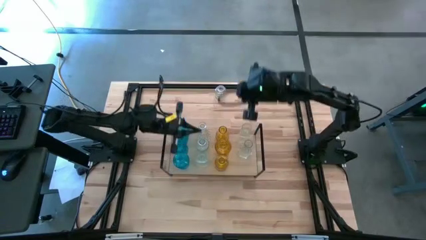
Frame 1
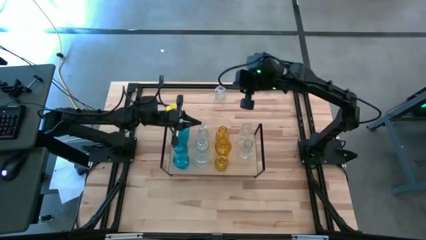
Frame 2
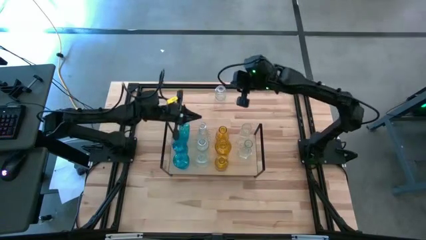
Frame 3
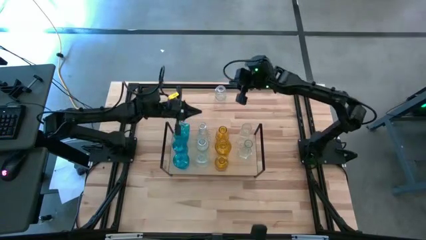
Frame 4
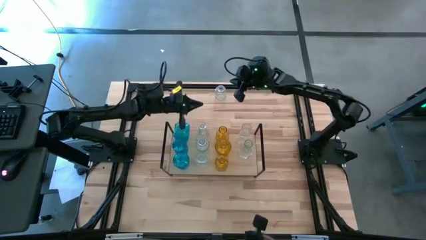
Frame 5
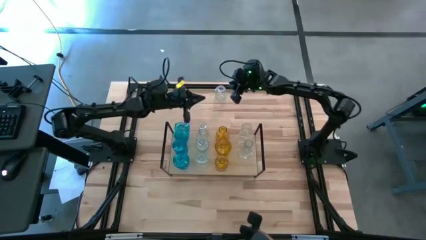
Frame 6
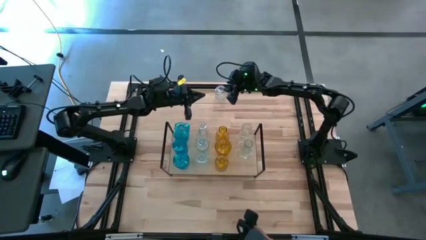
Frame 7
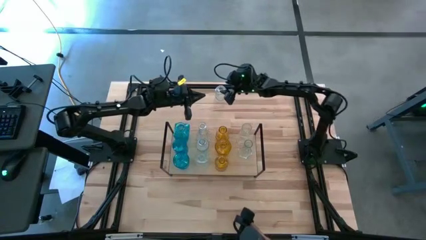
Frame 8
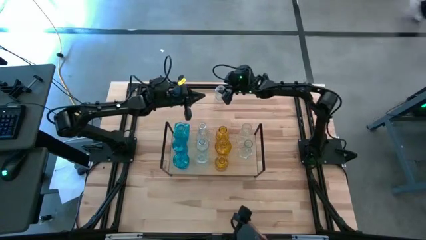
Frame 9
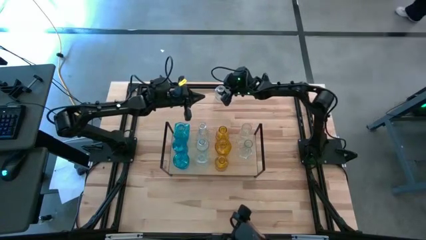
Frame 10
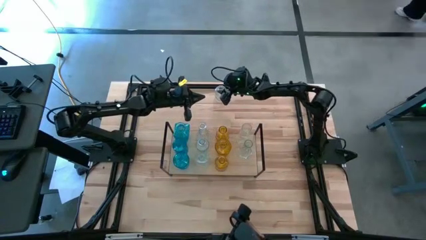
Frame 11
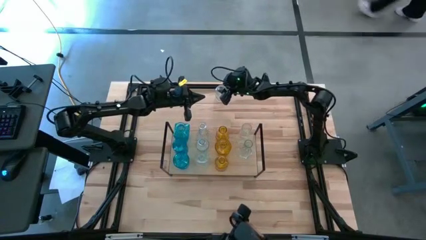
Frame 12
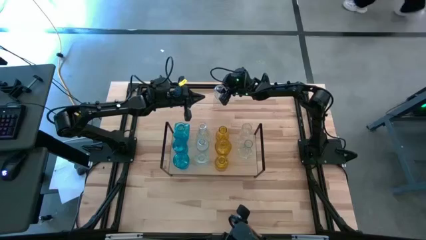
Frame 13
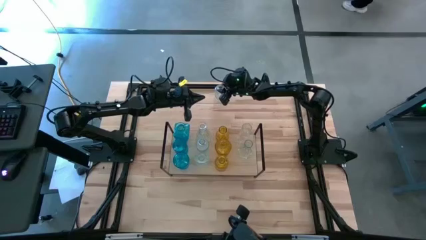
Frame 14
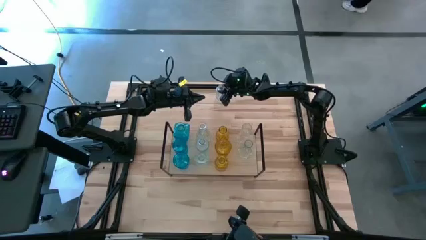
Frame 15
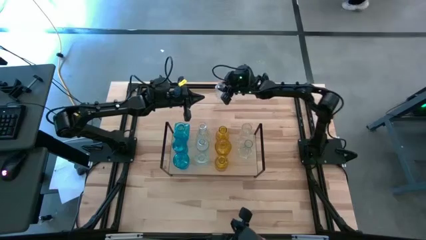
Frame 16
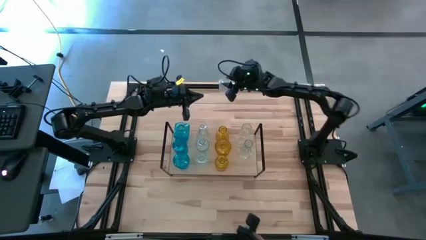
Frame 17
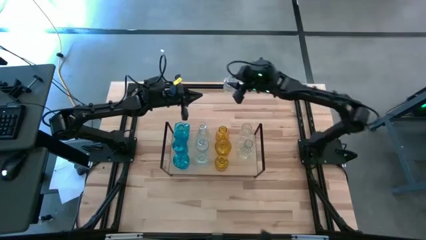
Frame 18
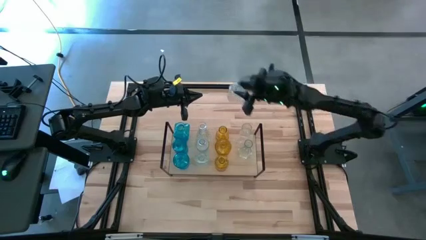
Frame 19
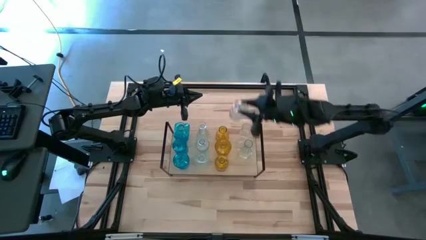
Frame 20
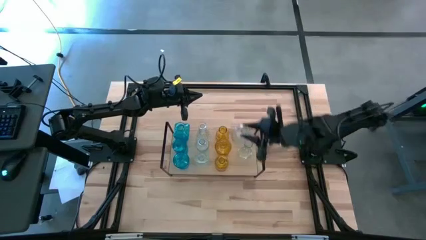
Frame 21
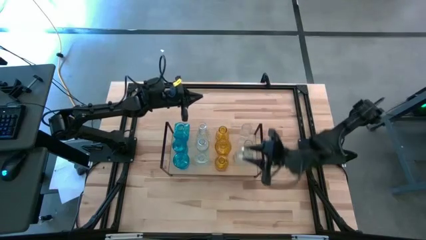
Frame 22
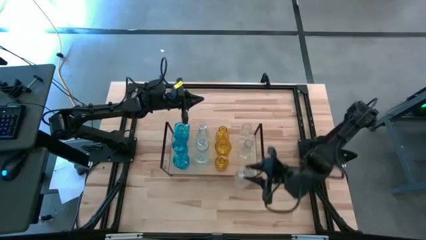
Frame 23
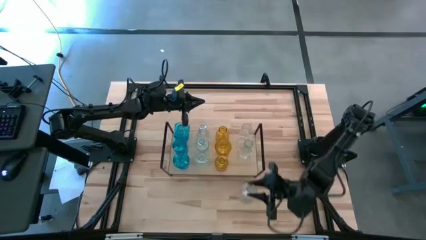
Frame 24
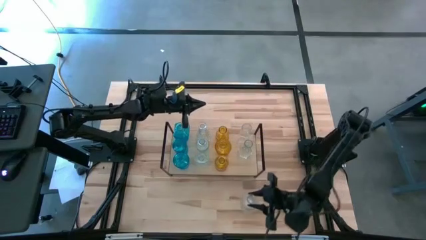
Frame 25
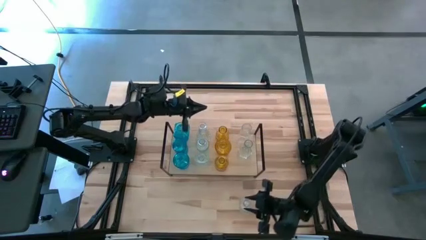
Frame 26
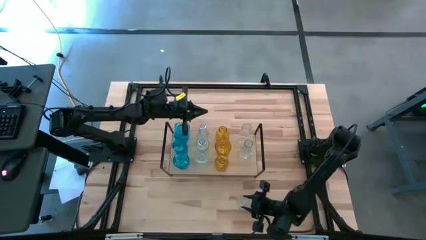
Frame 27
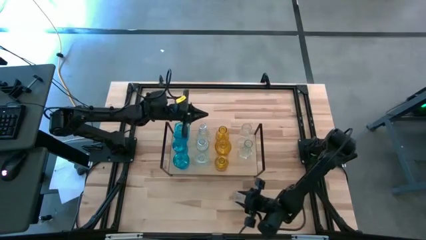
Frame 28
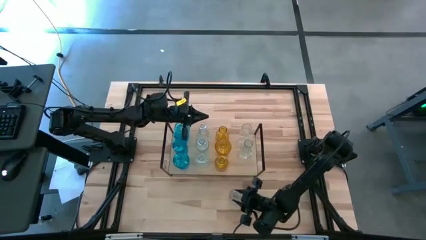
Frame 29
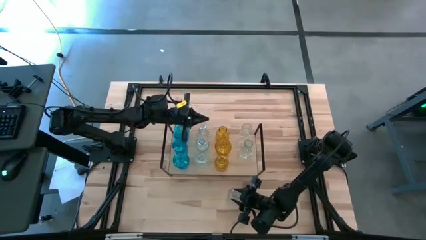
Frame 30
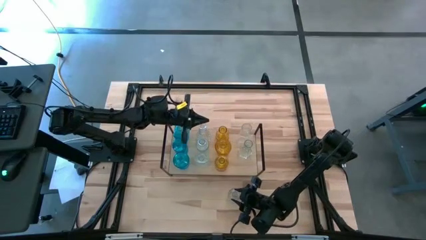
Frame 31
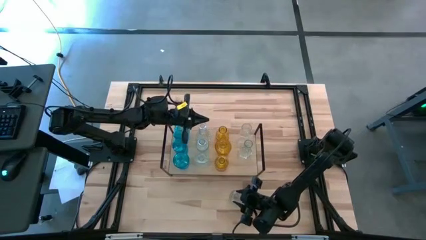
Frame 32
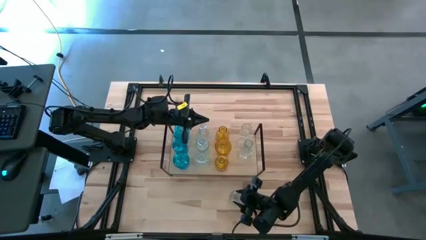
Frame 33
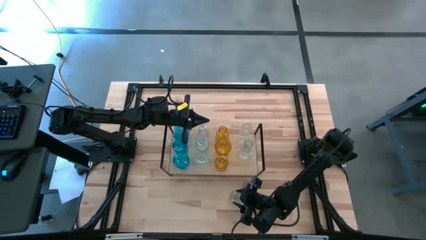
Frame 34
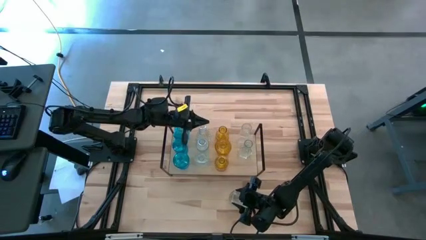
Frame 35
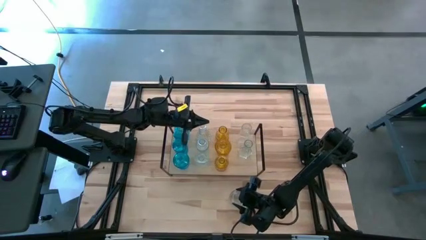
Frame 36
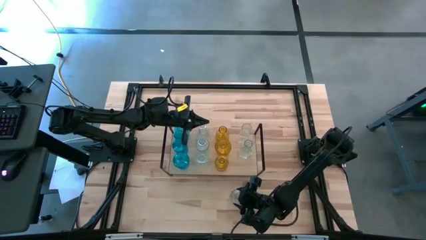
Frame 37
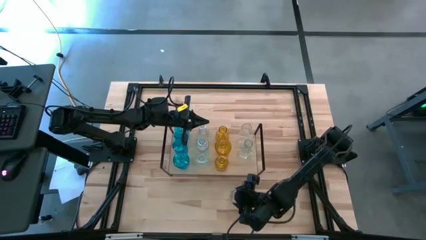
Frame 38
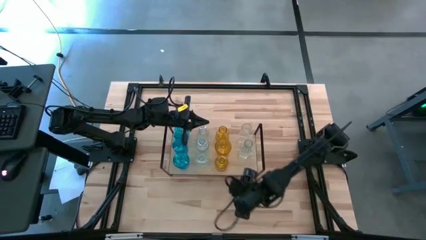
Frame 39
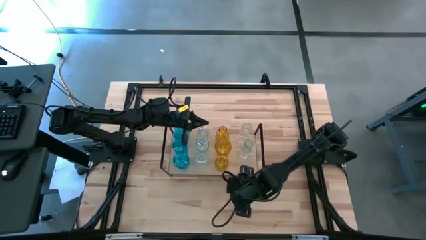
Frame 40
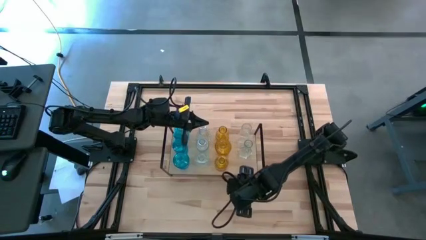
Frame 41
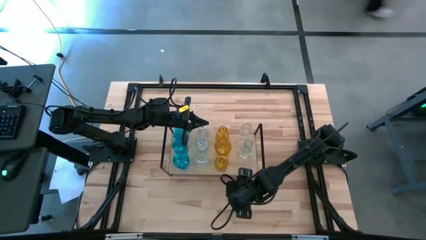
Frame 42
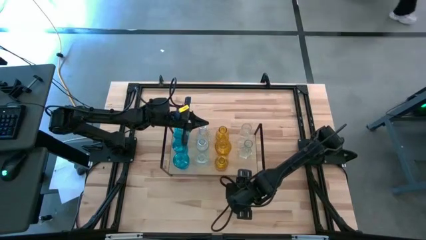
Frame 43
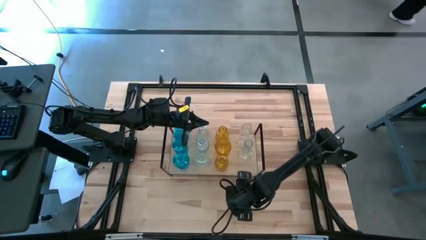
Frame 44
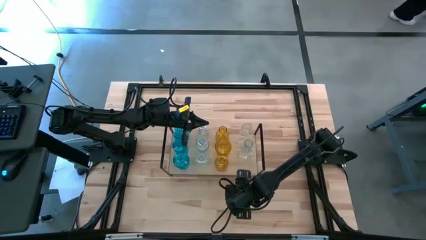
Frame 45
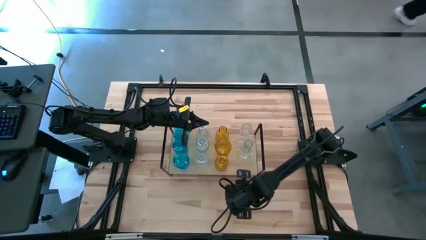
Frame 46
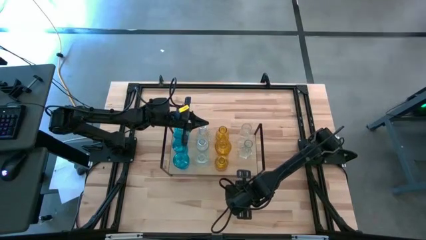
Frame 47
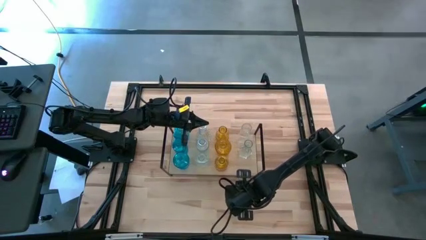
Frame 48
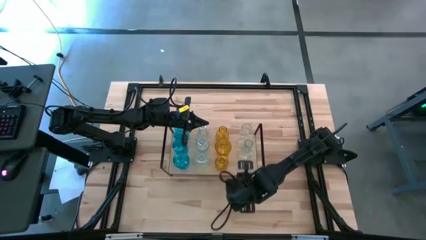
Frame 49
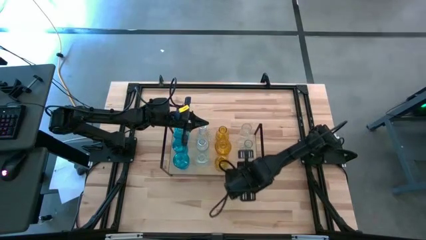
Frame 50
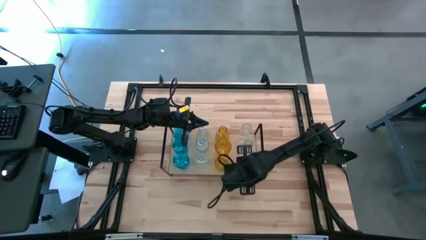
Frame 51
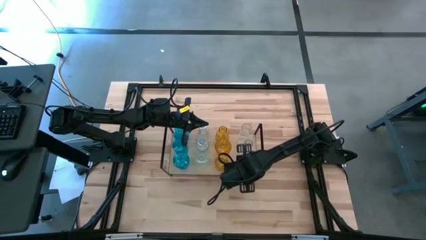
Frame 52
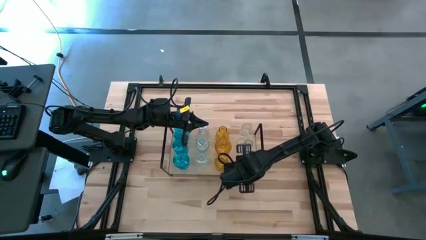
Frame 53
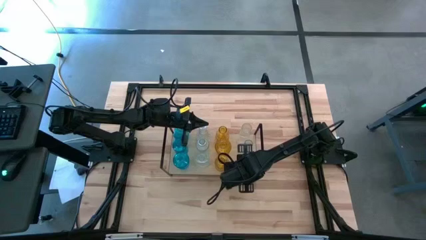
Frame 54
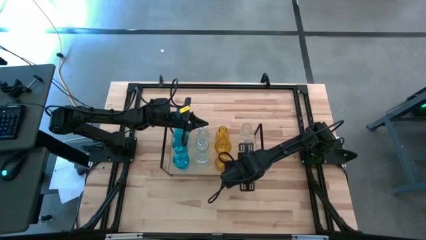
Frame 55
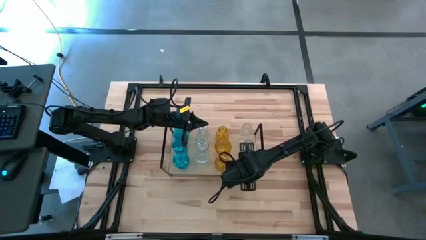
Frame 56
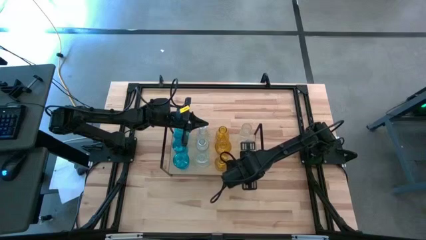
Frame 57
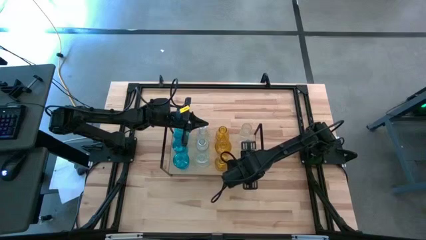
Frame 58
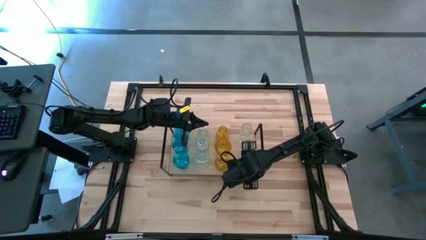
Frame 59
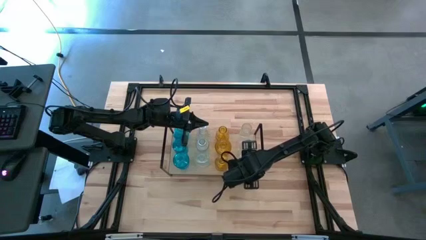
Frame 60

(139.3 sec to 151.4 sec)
Task: sort vases onto shelf
Put the transparent vase on the shelf

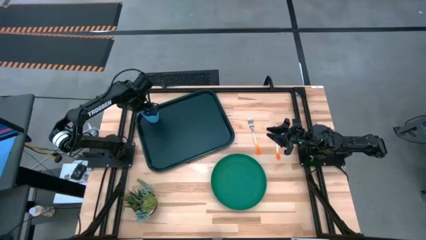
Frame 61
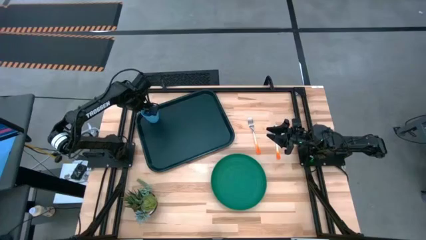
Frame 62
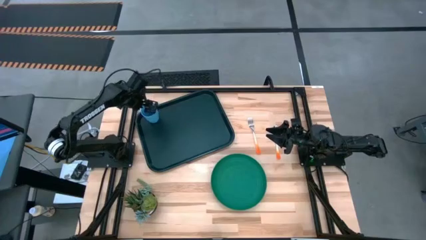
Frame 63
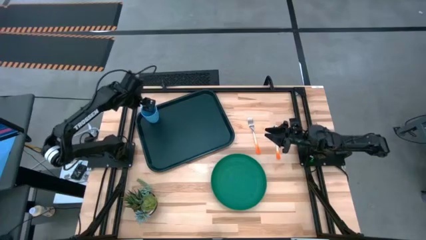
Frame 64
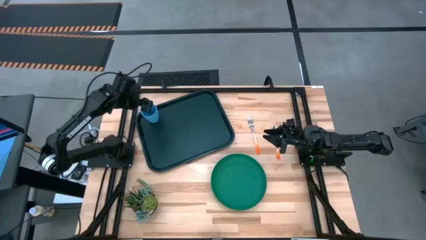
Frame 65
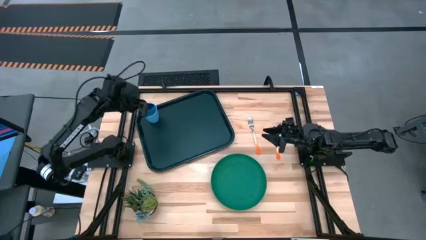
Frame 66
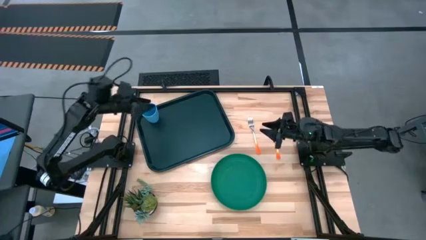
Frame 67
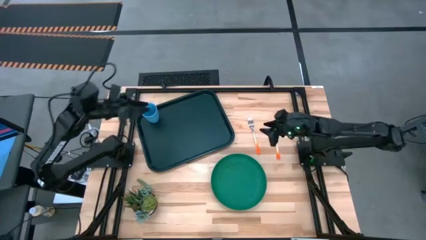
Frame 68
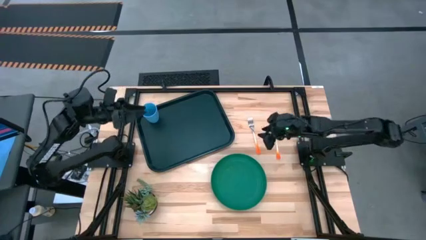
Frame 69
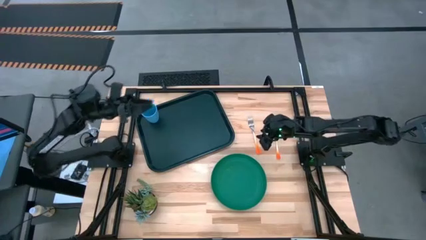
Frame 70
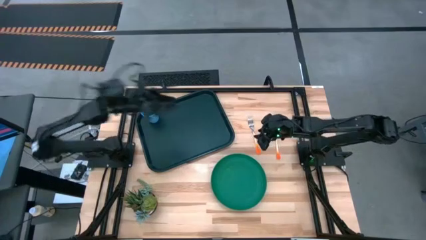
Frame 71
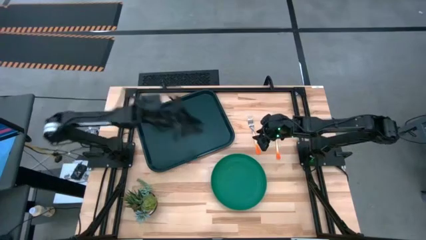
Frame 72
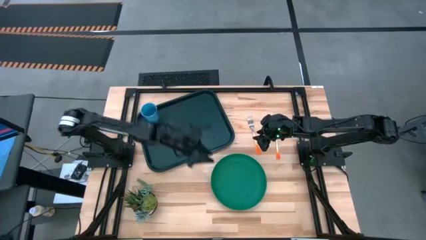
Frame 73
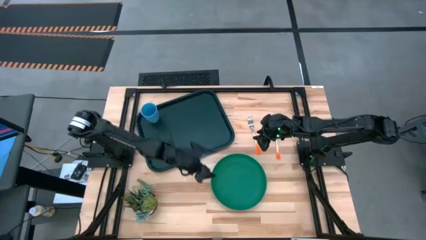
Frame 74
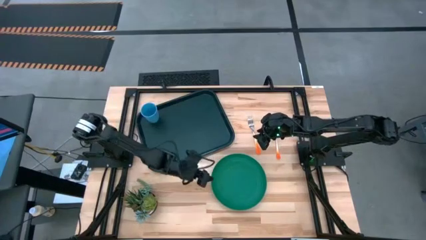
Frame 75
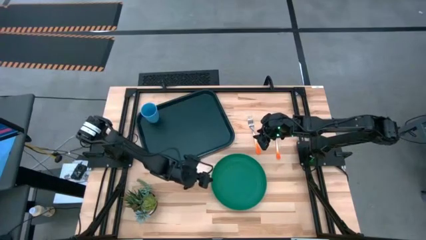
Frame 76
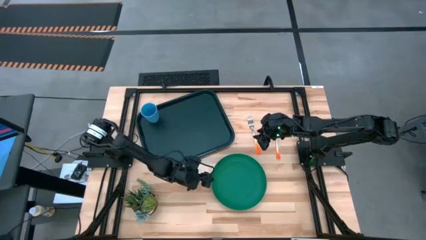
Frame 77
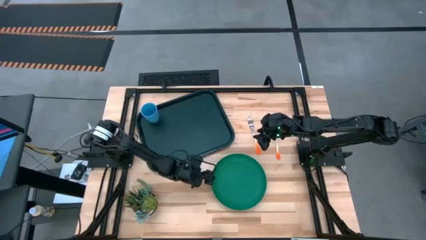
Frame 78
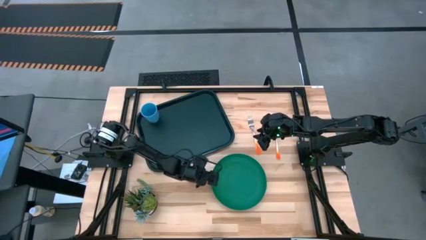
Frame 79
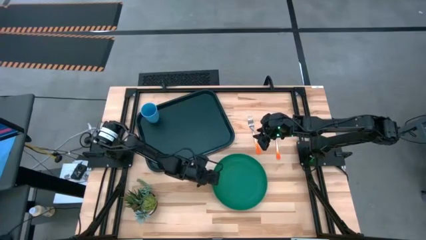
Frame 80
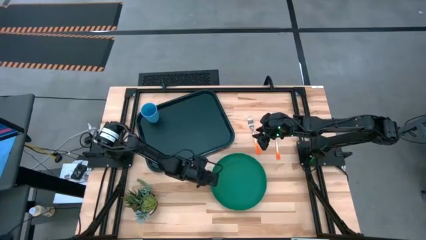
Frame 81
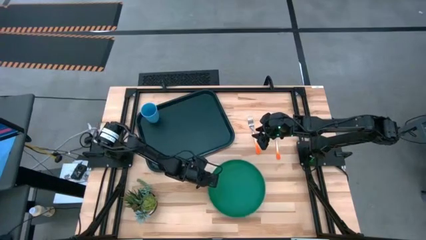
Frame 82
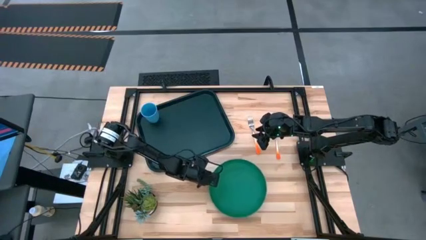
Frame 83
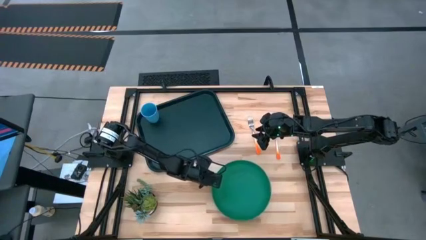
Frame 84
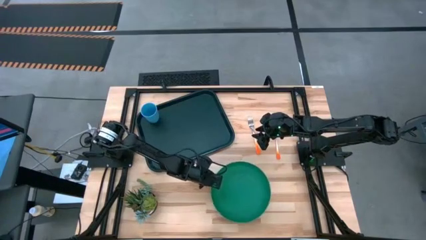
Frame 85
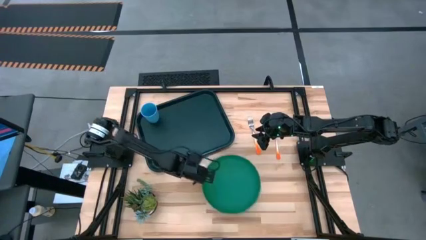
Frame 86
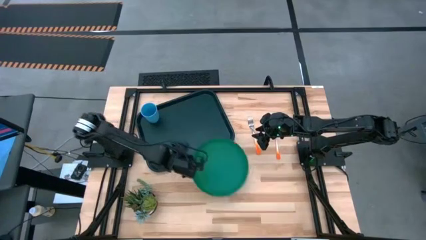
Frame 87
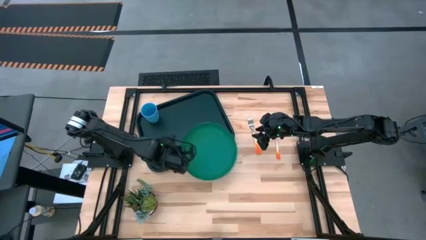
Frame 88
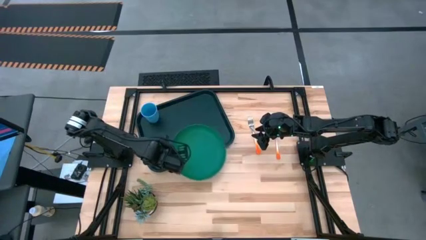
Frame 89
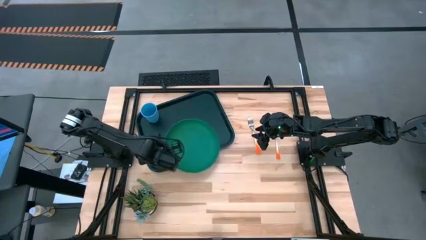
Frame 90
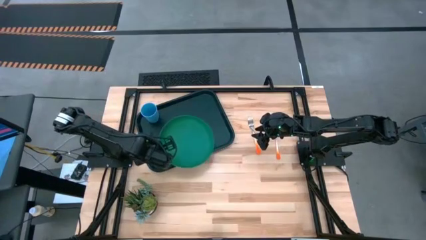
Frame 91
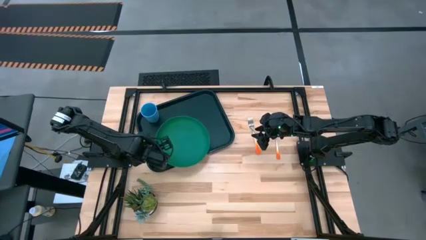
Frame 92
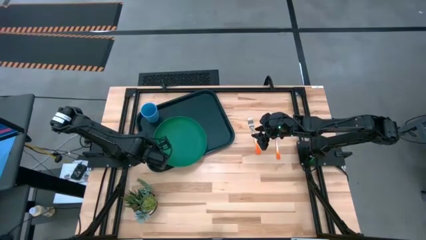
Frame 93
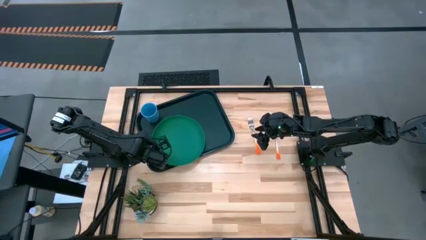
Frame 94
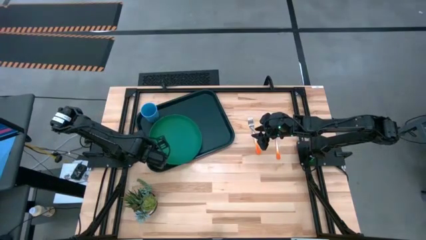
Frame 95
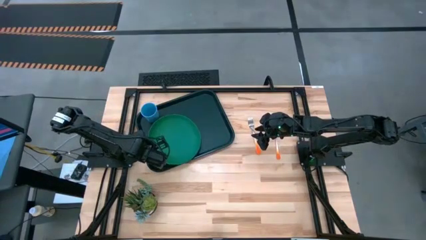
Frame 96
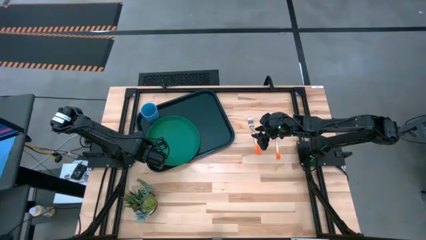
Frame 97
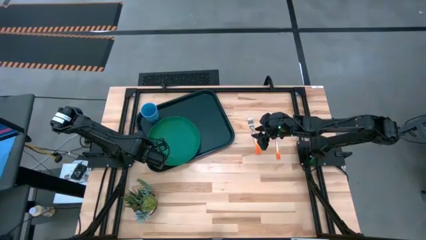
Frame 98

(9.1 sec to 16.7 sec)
Task: Pick and place plate/cup/fork/spoon on tray
Put the green plate on the bottom left of the black tray
